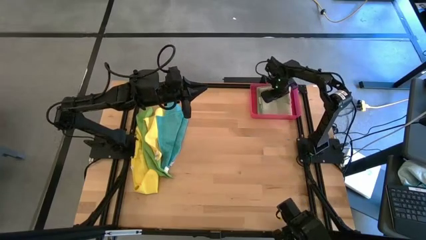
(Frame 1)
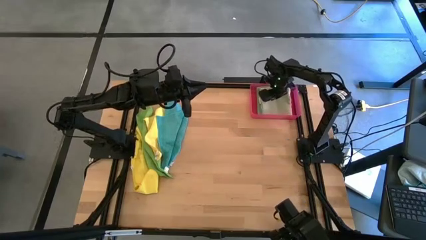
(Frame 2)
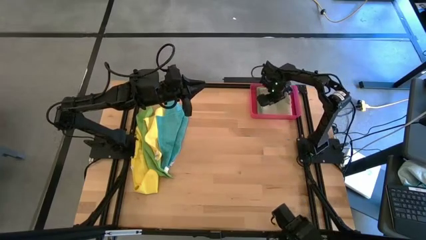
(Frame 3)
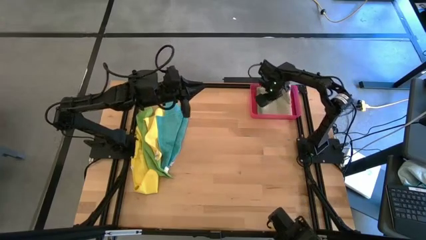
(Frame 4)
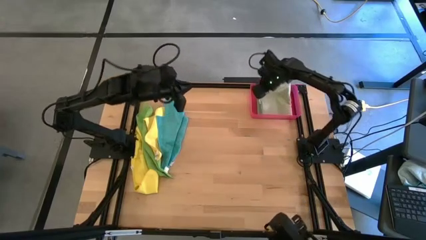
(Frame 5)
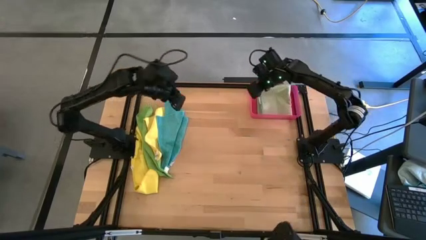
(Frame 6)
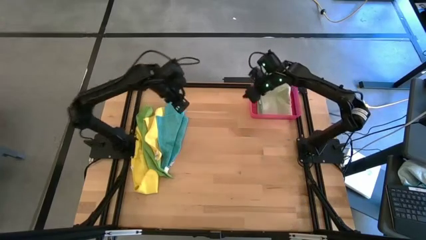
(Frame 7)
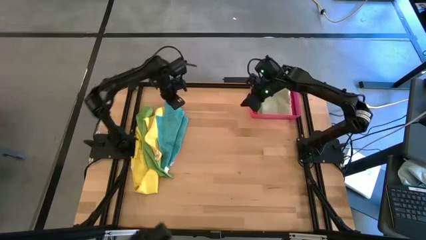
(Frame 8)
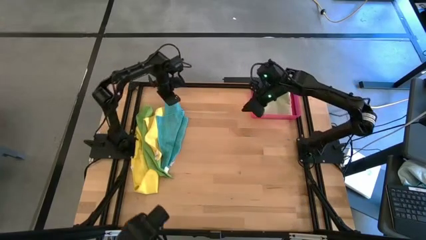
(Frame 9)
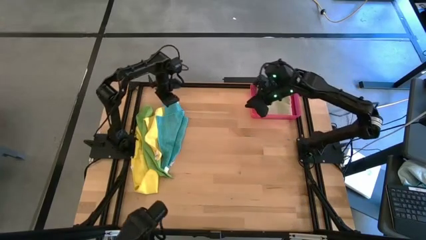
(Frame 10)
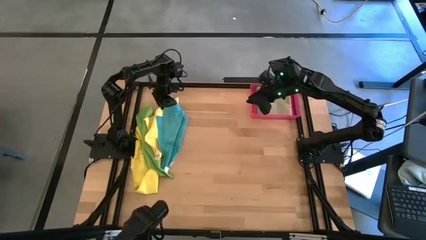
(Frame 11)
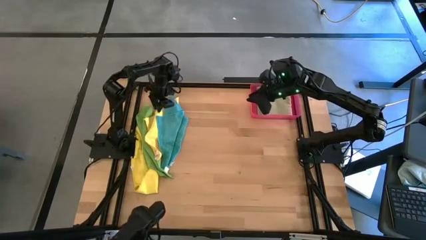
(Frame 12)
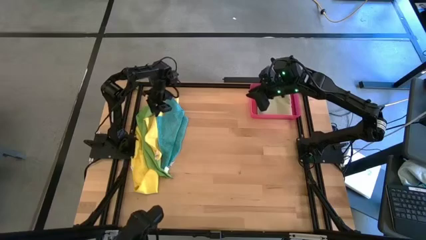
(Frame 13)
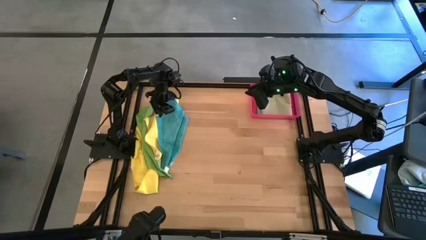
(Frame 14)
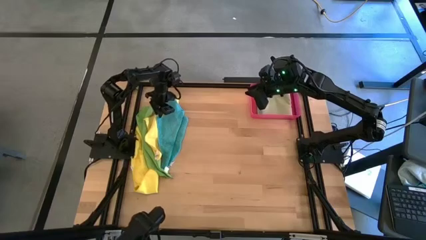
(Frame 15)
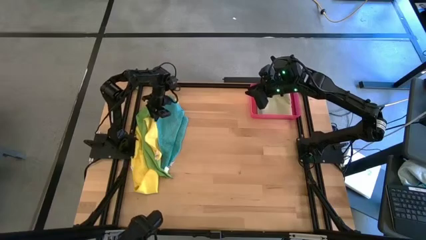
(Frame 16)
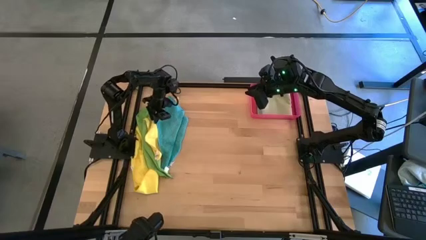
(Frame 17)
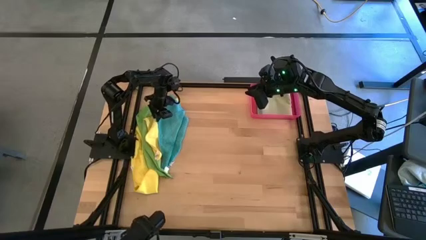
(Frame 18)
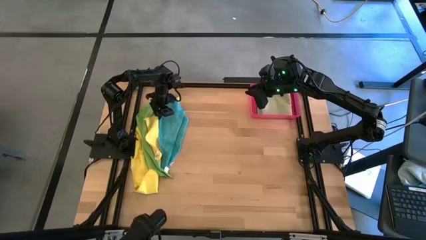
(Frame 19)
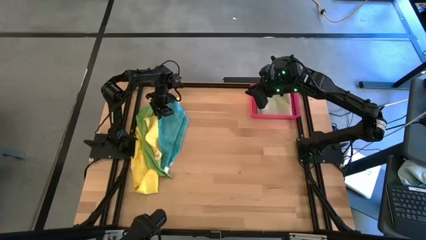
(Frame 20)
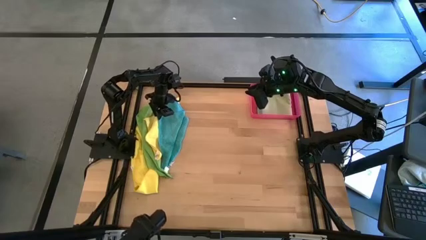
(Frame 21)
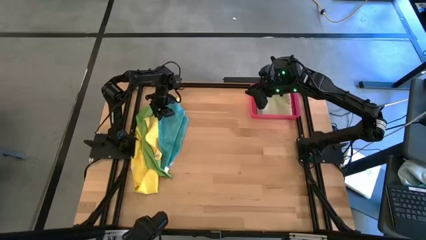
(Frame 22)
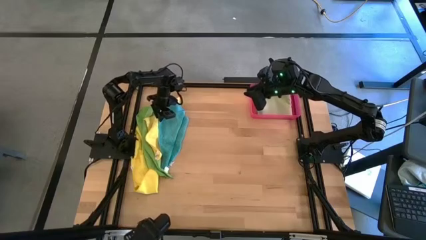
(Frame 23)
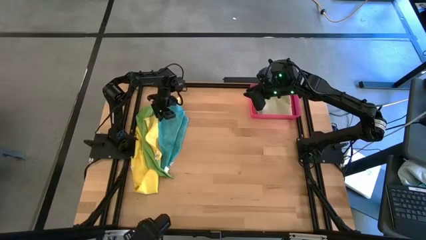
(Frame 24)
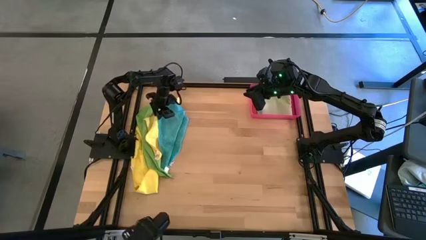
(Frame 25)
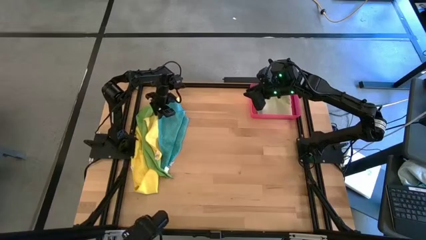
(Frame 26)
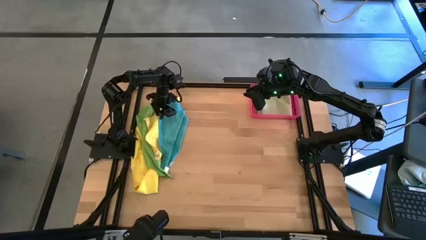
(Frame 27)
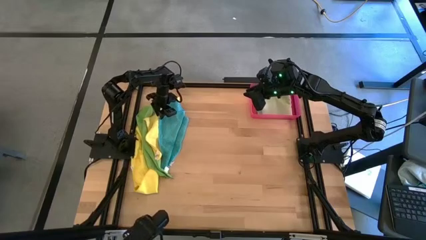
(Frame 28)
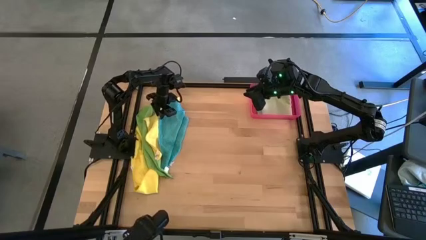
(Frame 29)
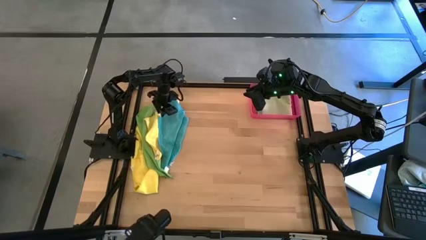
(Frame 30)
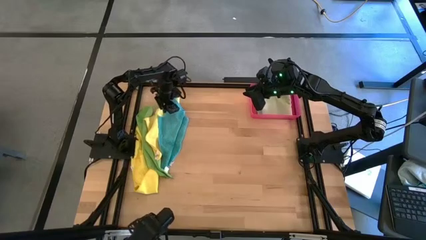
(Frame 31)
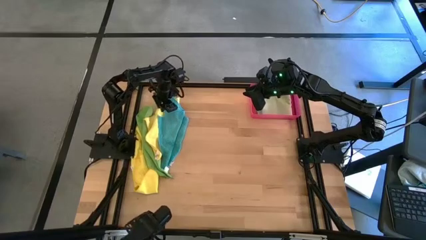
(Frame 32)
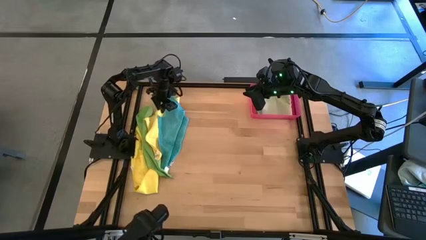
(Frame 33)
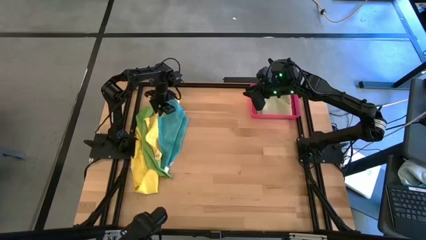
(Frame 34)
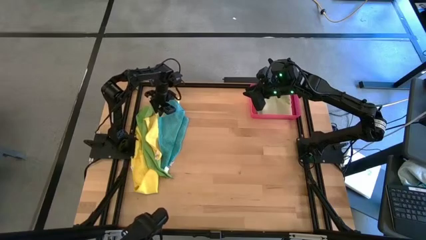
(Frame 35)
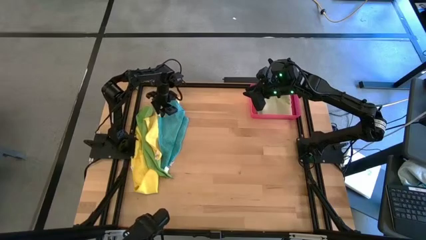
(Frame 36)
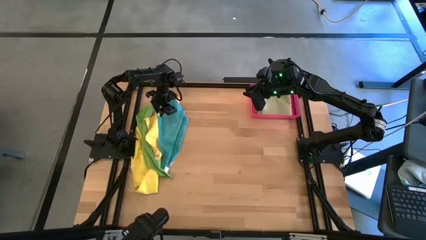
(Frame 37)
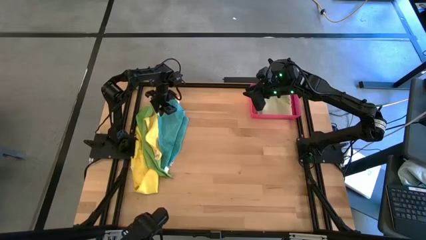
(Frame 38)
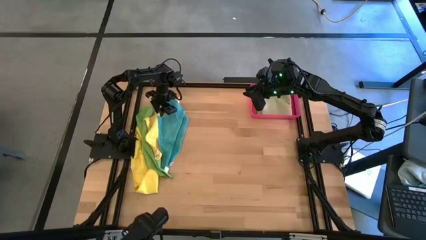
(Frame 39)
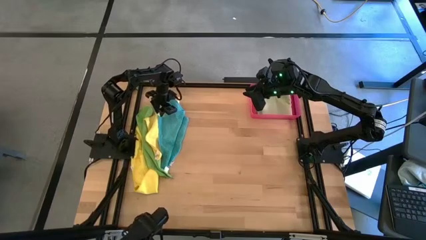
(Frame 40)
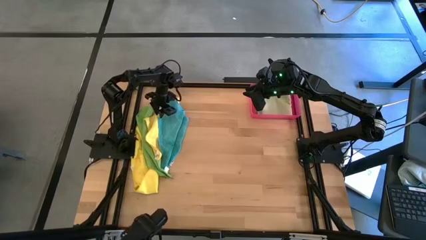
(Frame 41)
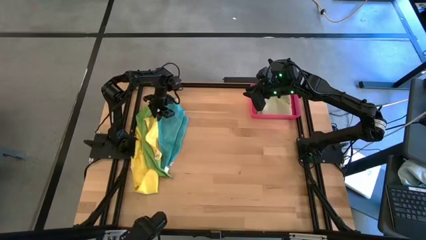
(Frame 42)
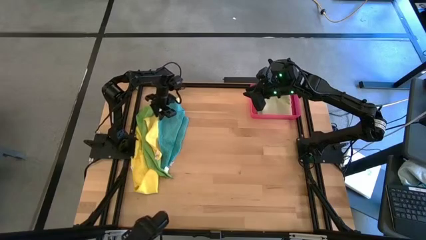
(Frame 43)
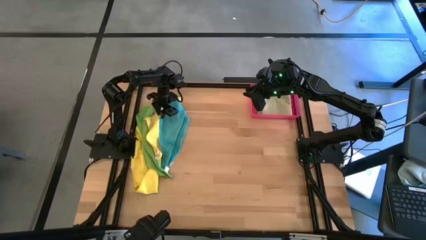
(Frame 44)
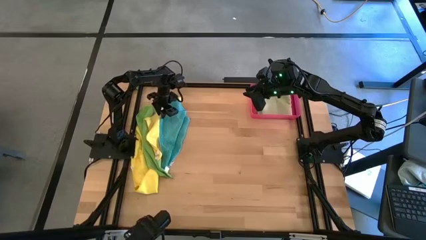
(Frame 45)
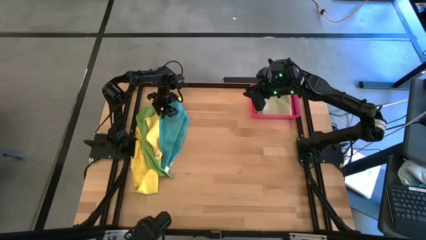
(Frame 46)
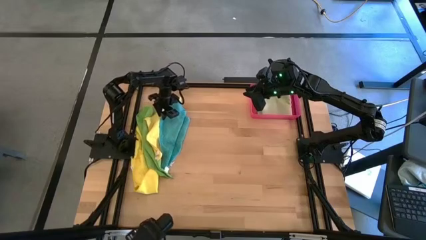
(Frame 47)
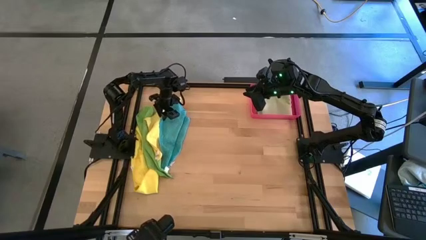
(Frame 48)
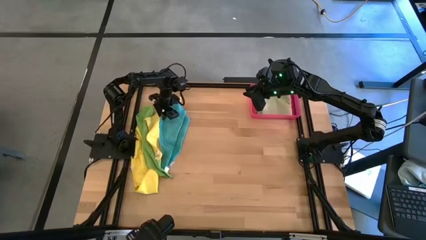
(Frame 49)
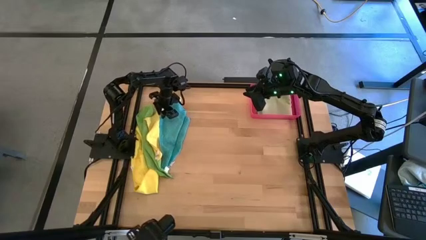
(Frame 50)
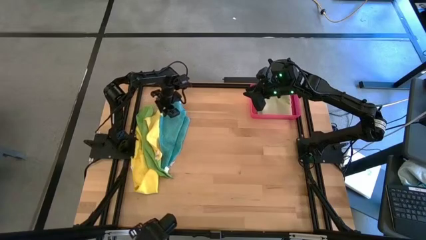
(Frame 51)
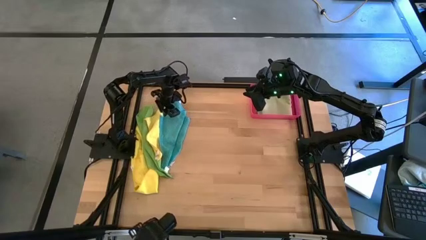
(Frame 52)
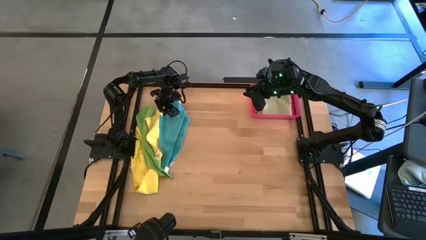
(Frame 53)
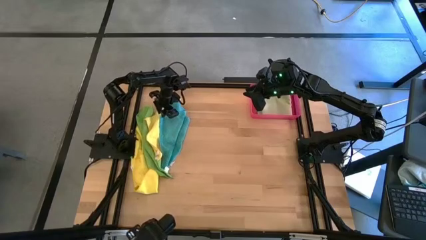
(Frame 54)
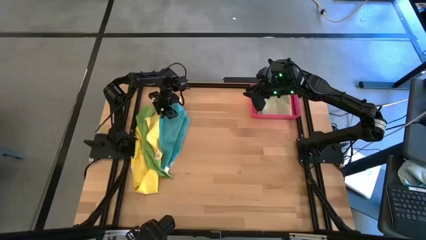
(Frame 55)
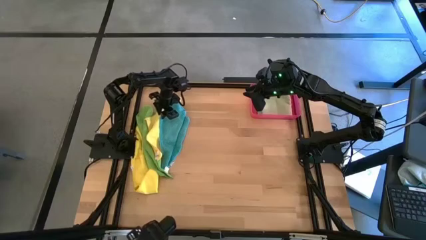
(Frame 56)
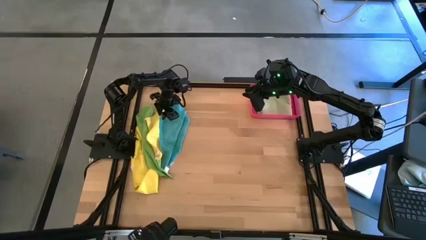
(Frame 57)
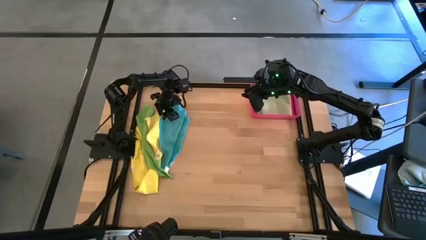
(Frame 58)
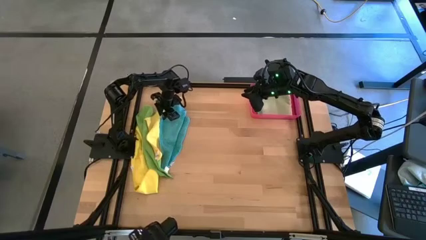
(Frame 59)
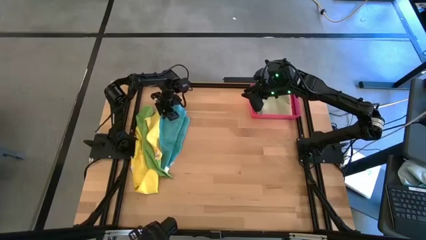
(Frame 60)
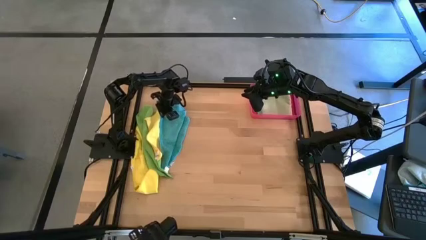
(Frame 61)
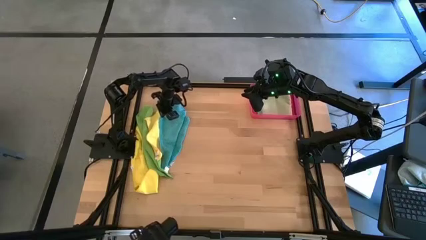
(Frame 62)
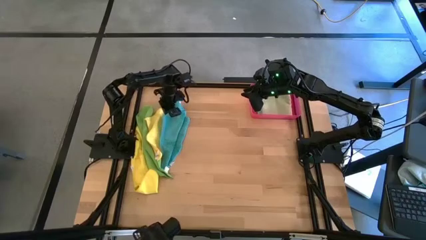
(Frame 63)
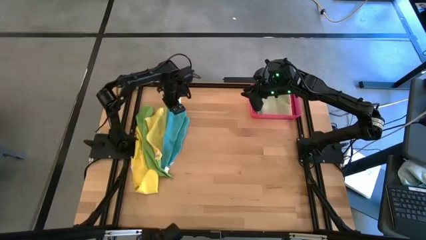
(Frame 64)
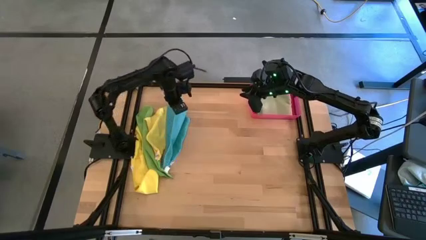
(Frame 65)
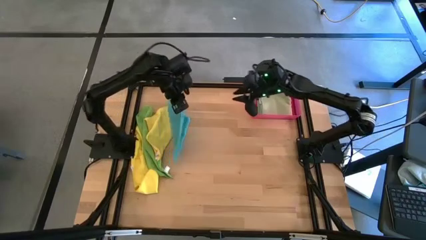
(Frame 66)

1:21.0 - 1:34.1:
Task: Fold microfiber towels
Fold the blue towel

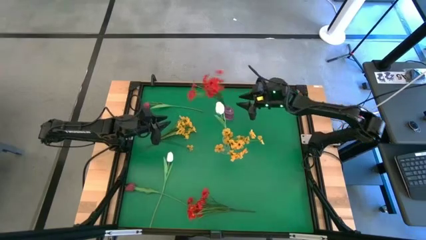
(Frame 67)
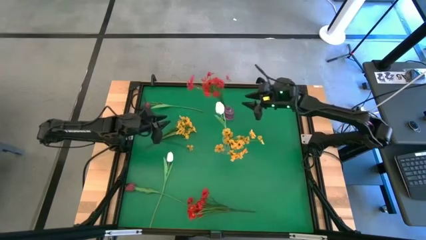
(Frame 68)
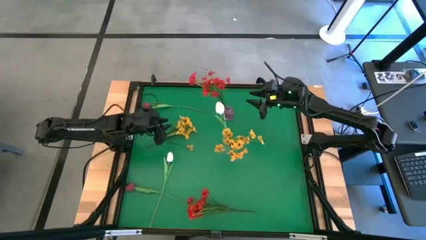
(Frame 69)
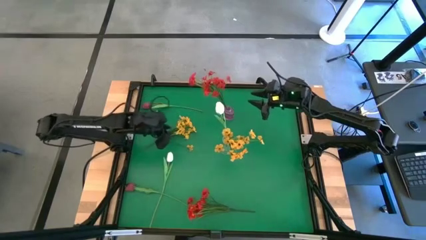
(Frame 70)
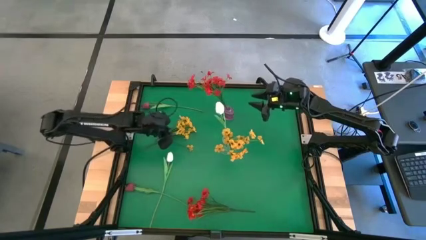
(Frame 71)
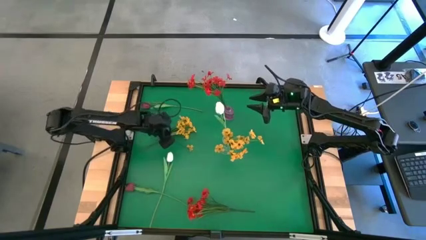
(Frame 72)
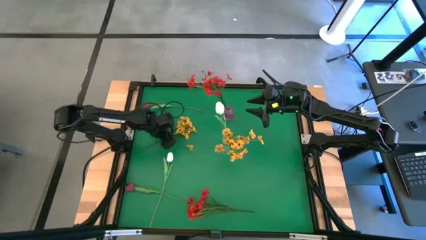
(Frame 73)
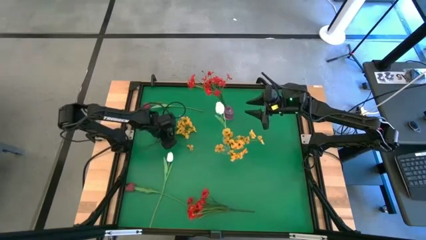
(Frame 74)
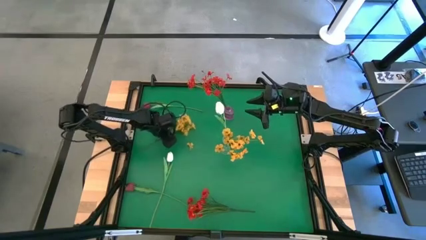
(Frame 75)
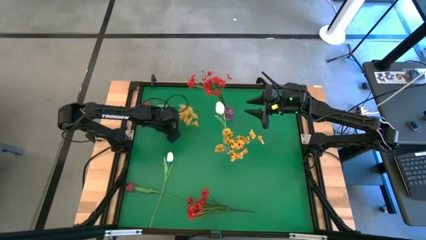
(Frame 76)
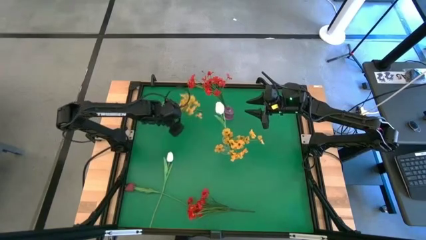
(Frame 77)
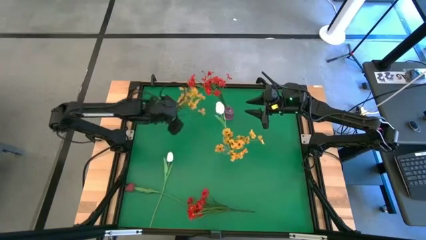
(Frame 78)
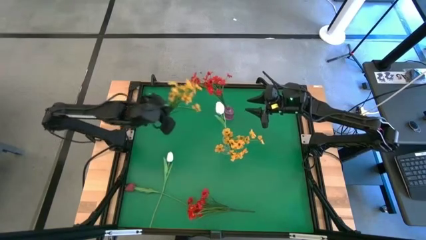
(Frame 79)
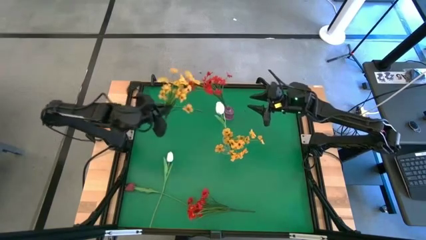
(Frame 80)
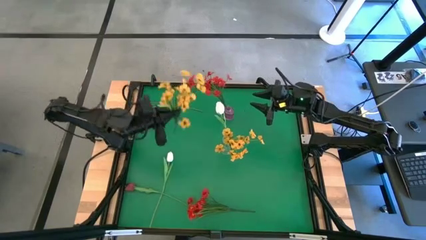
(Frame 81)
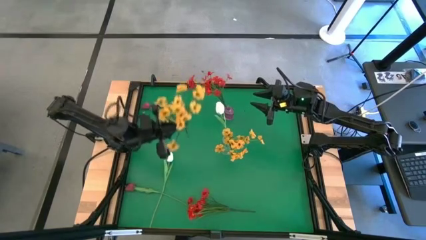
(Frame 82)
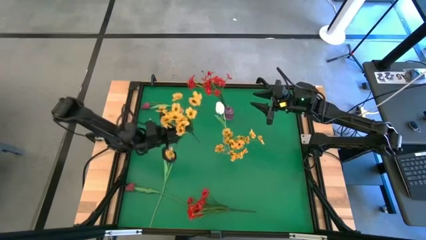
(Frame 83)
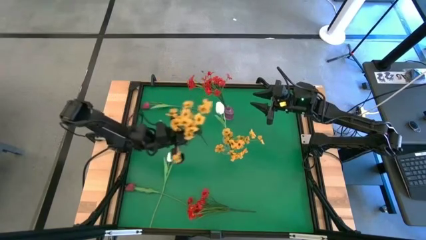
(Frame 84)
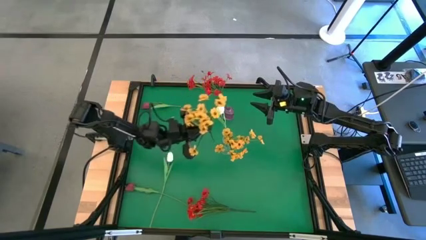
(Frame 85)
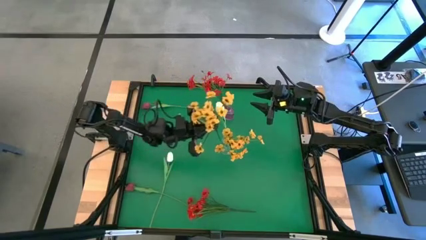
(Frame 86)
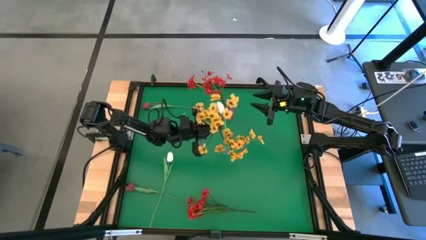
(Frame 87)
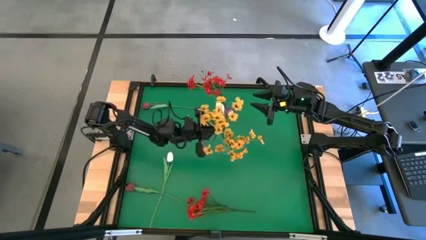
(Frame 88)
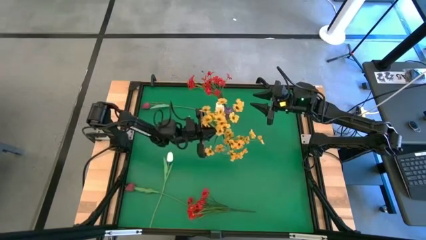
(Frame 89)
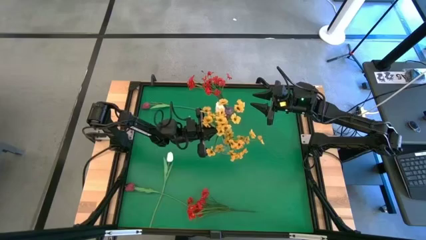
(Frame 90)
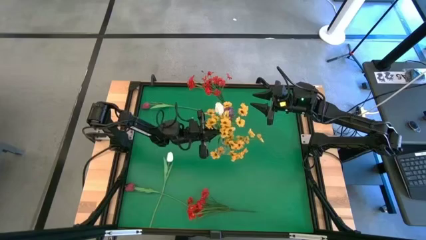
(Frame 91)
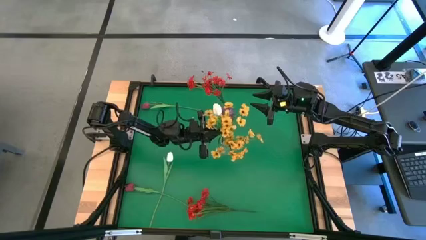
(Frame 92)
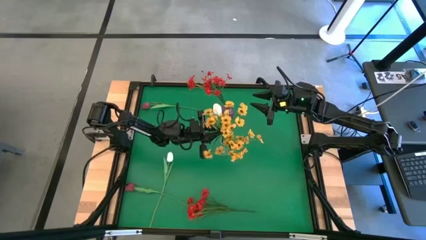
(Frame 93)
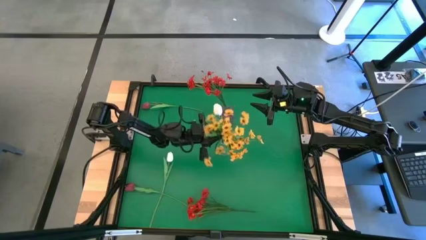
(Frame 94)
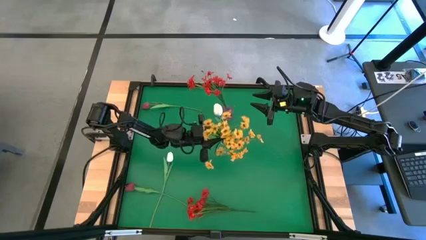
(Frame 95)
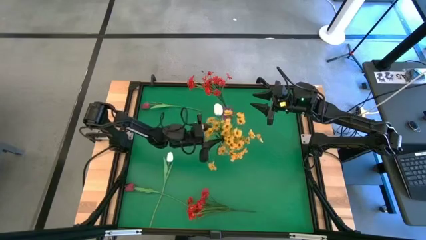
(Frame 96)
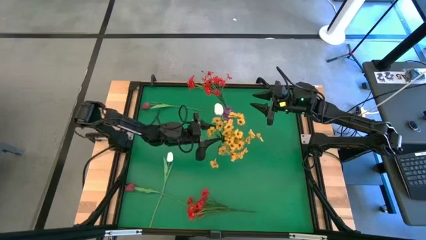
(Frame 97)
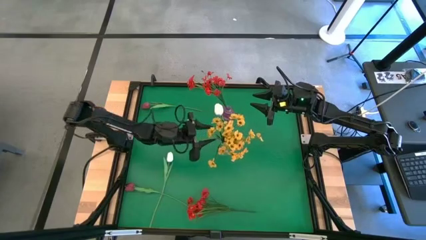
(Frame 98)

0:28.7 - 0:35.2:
Task: Sort flowers into vase by color
Put the yellow flowers into the transparent vase
